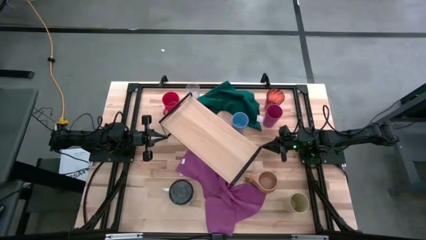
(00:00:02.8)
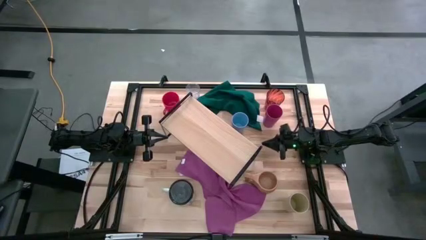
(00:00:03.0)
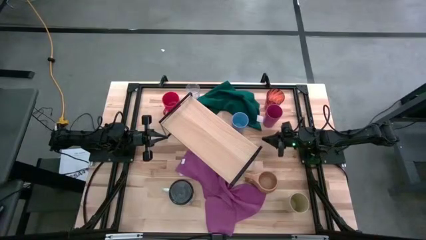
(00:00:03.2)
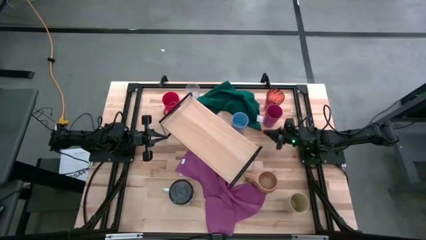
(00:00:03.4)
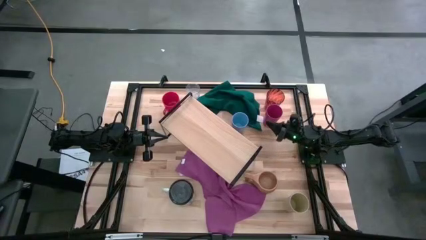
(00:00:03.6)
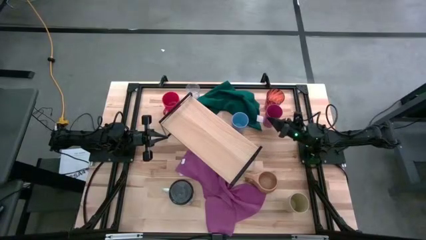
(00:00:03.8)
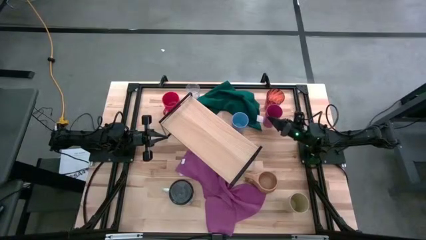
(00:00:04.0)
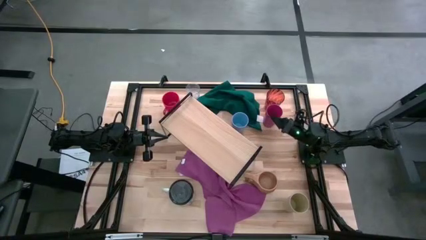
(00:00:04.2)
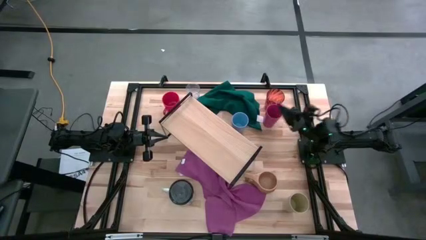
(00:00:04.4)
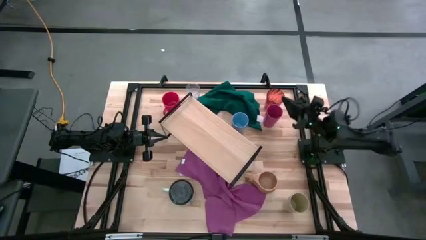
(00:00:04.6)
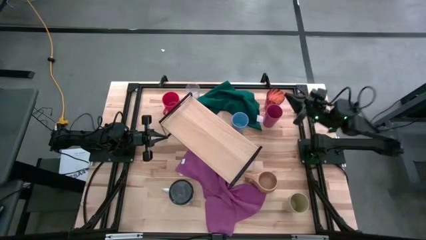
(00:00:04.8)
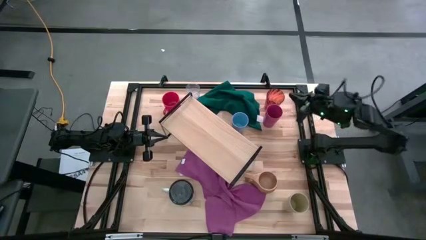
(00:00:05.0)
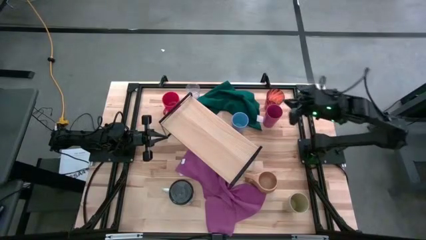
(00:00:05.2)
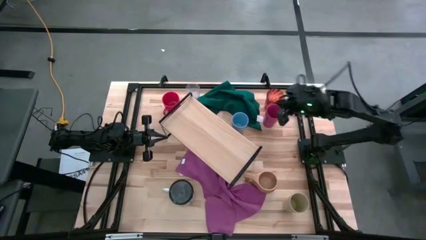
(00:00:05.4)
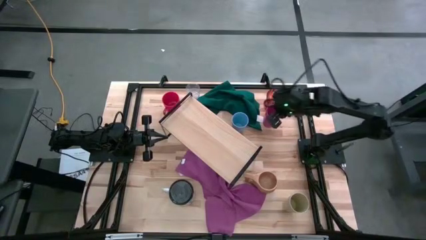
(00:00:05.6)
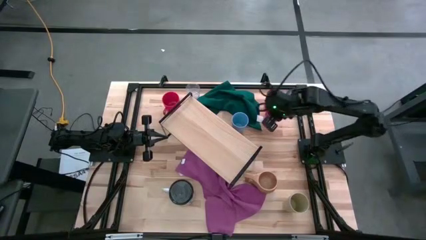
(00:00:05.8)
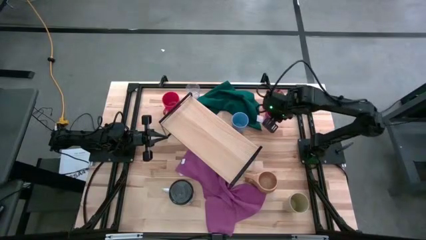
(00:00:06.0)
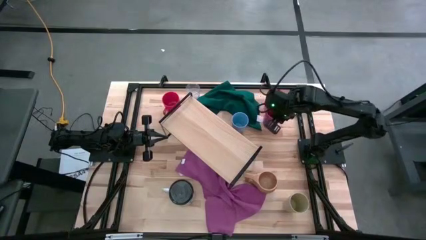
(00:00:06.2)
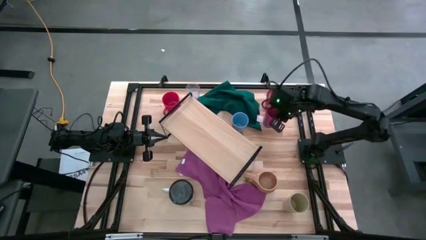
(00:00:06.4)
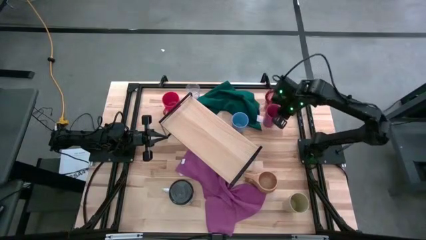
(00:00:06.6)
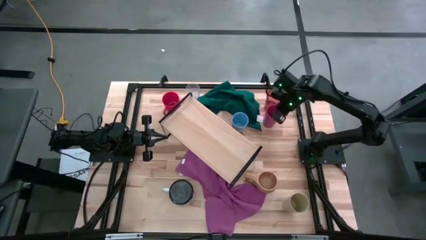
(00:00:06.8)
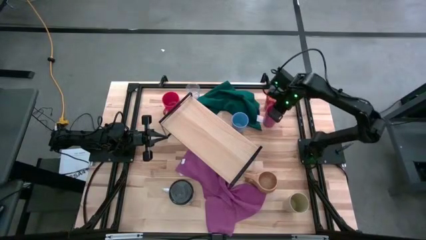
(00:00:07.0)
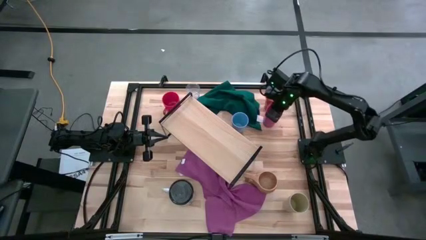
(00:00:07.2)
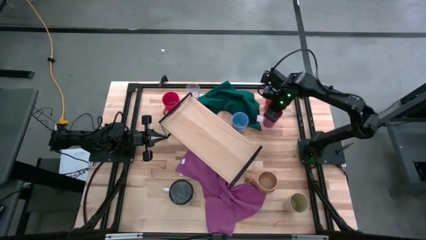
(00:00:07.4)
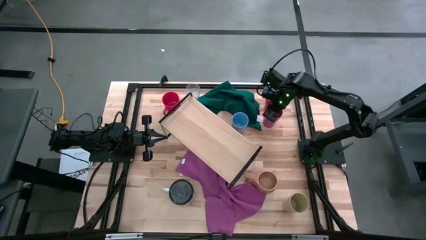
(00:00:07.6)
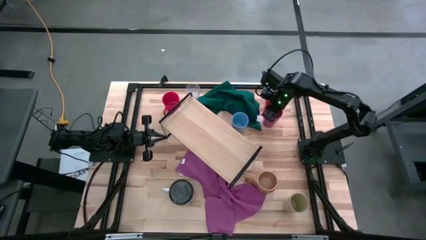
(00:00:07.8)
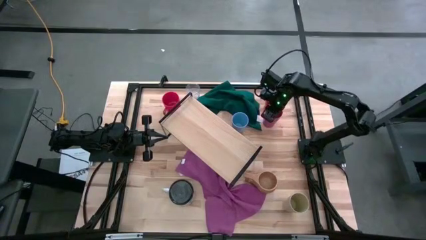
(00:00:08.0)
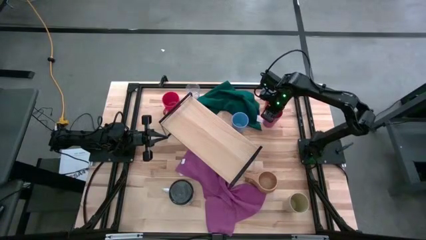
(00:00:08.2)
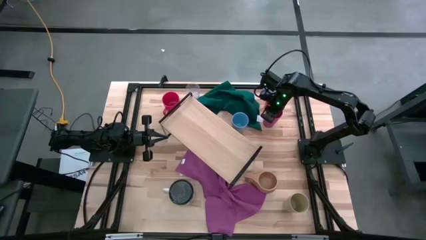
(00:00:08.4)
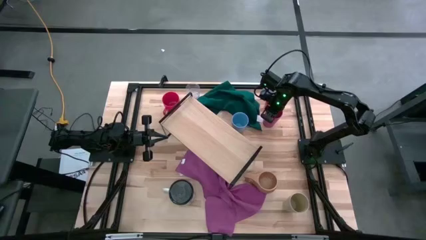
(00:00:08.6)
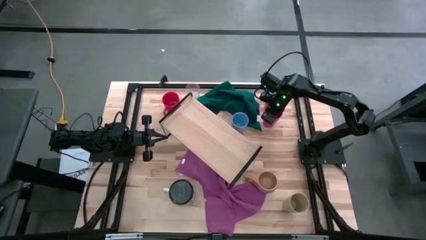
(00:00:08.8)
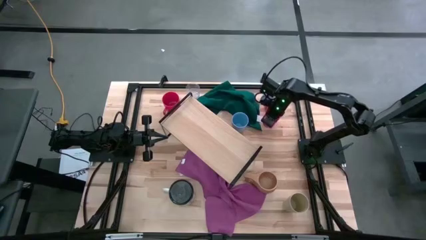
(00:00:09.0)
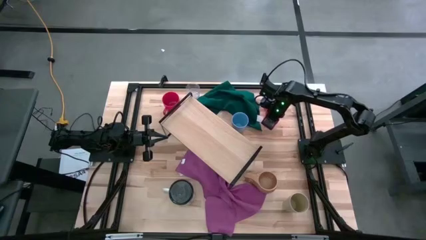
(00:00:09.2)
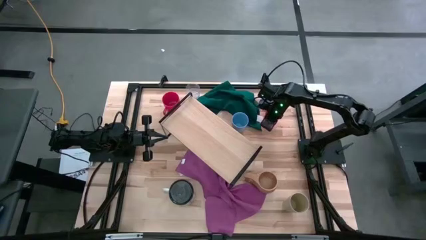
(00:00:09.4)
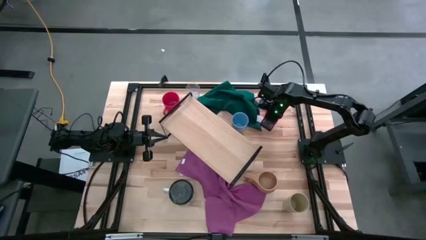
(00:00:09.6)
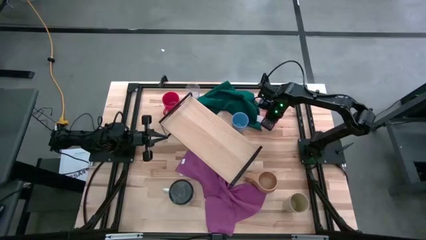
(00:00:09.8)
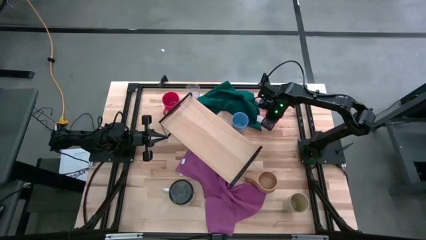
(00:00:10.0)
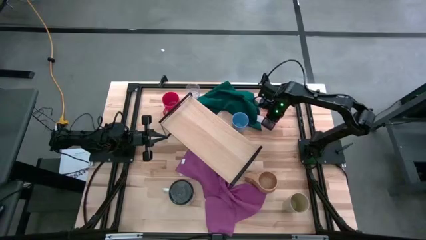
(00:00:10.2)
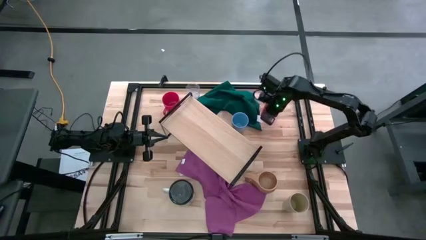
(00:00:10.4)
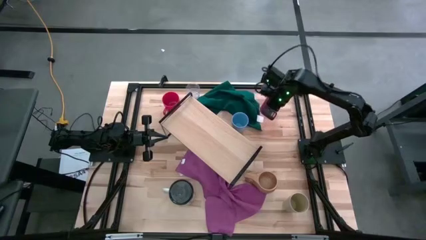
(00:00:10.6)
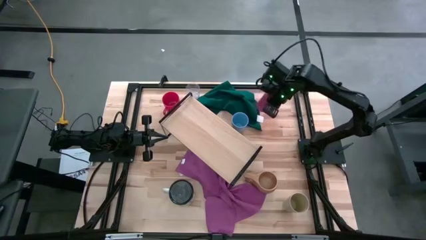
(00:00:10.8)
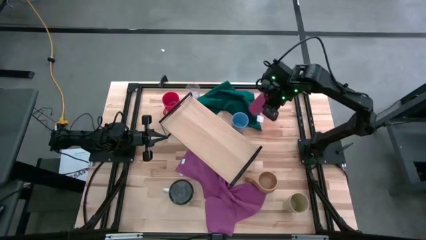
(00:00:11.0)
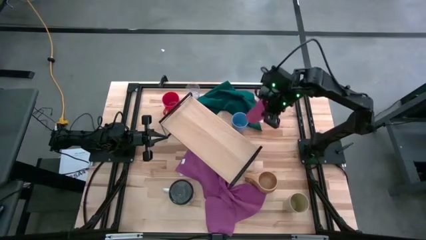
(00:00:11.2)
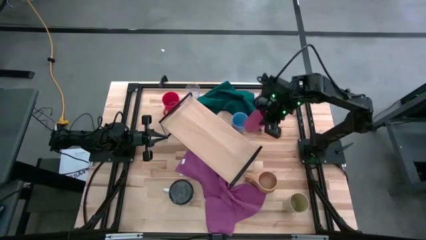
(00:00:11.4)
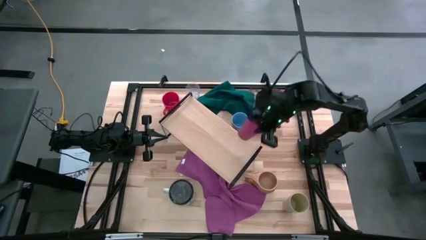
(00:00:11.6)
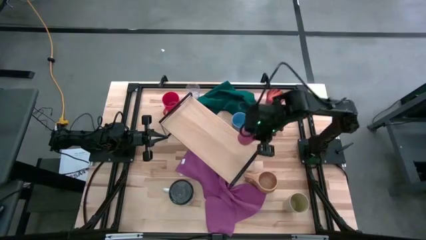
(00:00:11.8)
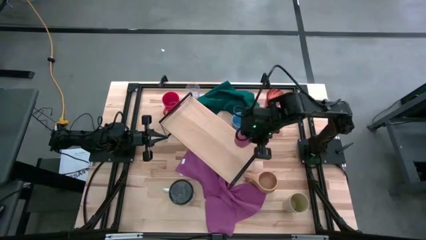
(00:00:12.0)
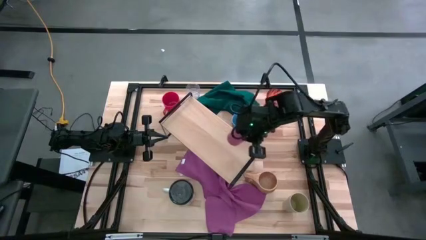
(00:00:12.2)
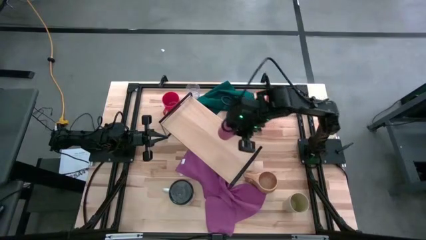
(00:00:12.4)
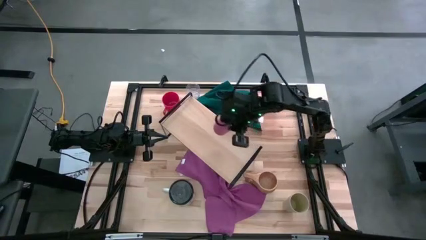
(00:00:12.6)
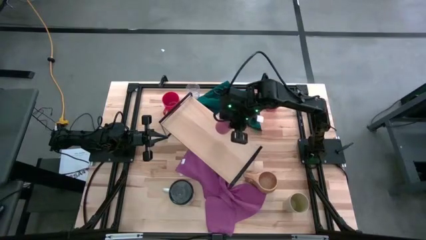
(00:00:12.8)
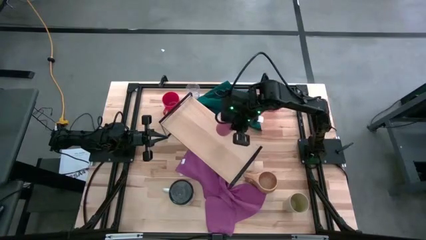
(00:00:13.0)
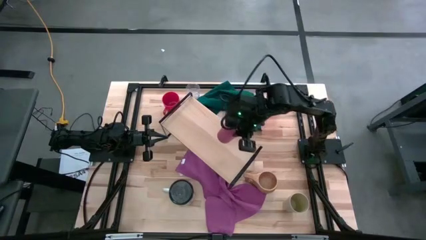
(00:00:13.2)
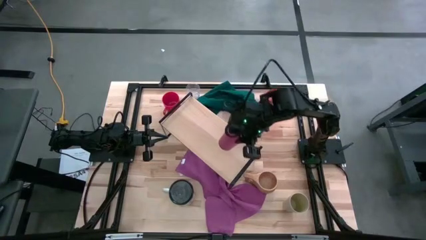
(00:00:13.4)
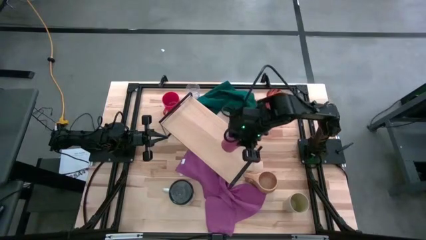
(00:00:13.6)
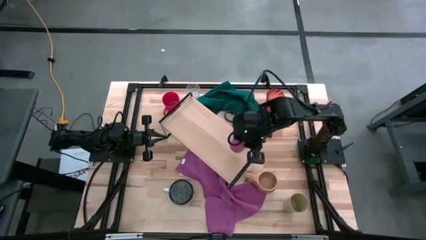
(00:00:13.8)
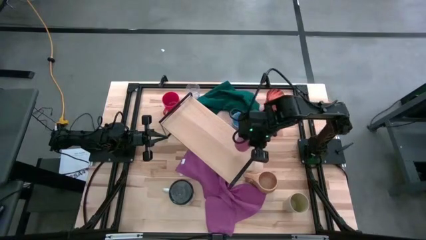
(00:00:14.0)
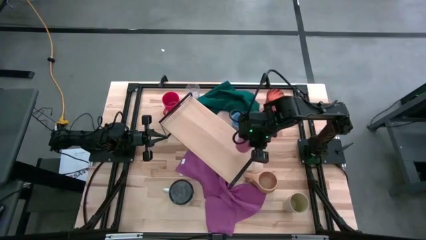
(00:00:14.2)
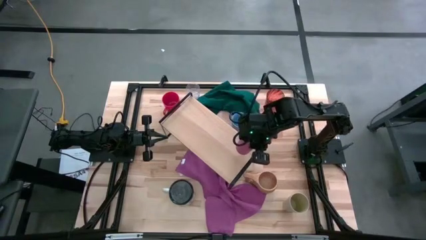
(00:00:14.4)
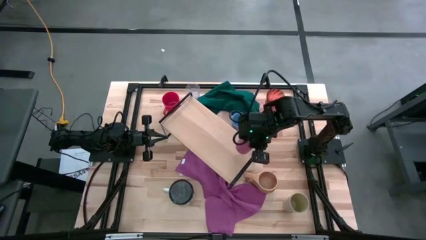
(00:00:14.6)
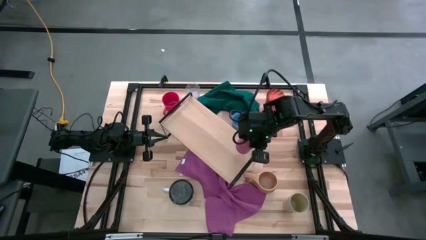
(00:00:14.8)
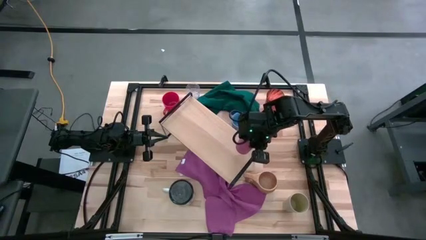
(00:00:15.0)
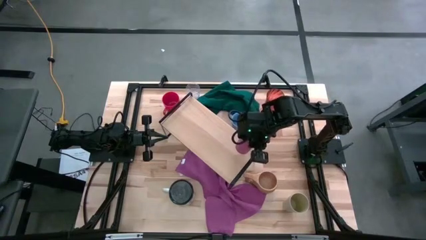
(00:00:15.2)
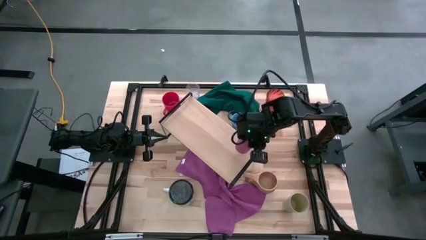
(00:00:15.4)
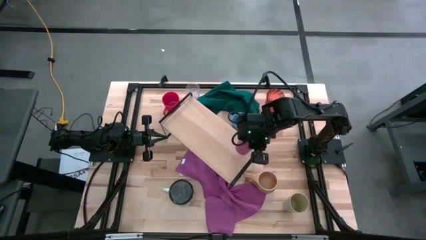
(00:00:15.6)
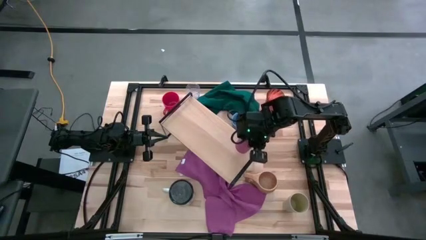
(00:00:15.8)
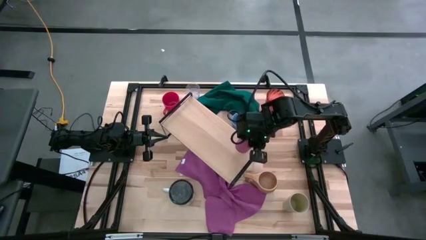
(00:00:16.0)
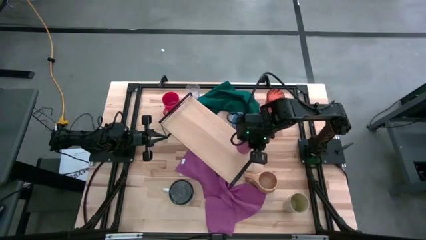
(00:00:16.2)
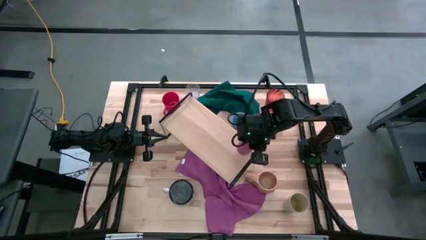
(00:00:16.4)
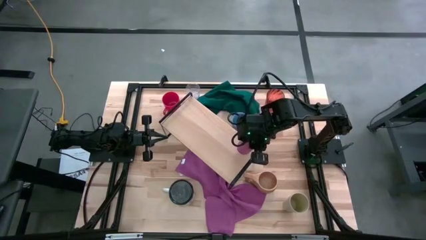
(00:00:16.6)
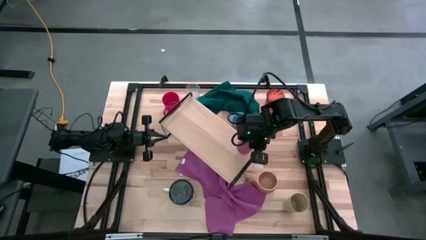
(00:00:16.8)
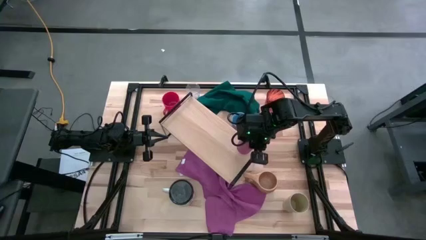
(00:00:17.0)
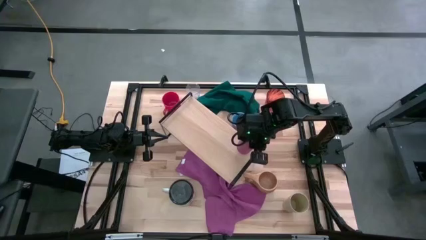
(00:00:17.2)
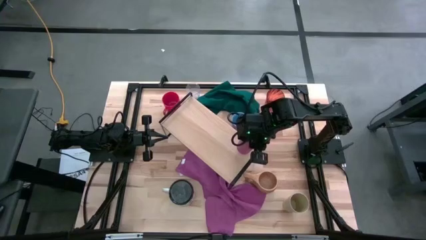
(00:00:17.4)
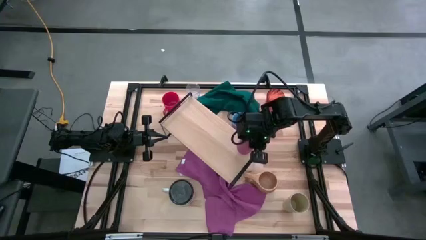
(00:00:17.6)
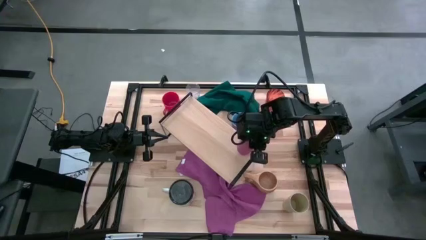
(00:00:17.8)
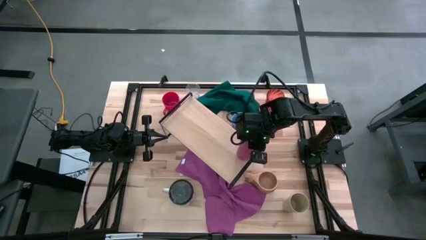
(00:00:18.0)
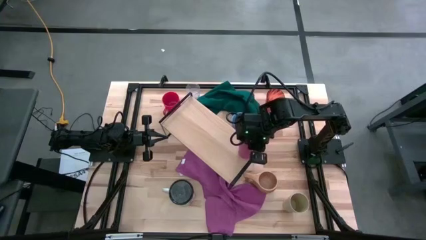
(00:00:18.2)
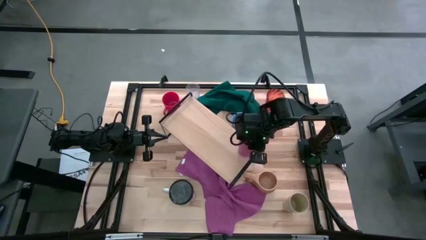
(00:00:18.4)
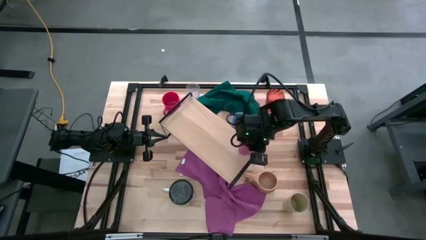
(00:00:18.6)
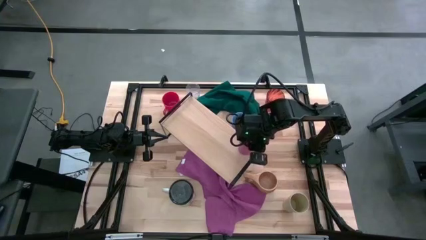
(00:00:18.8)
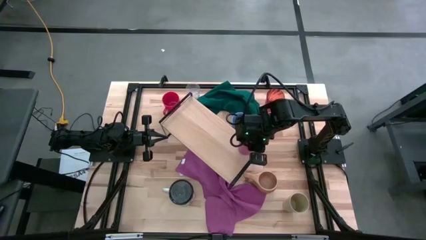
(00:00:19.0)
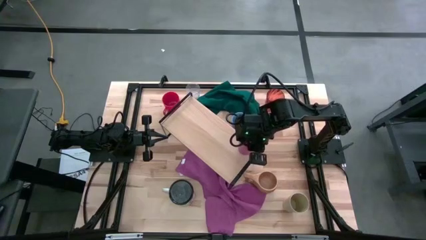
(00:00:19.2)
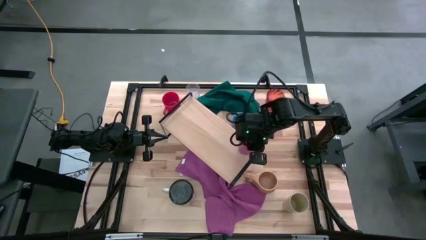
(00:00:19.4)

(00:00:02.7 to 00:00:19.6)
Task: Stack small to large cups/mugs on shelf
Put the pink cup on the shelf
